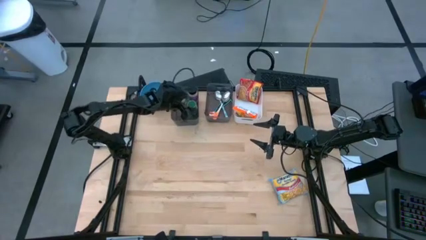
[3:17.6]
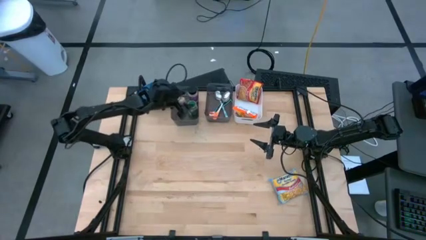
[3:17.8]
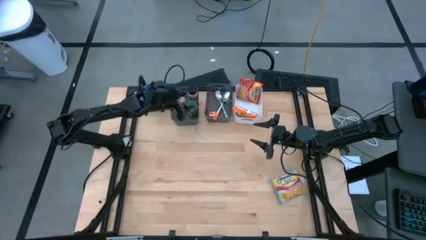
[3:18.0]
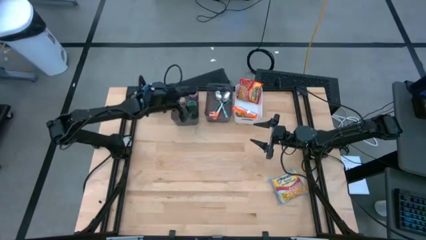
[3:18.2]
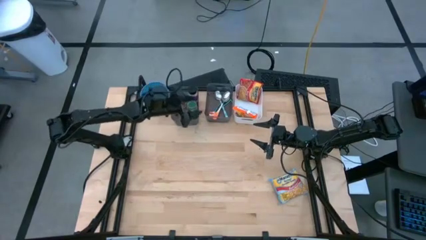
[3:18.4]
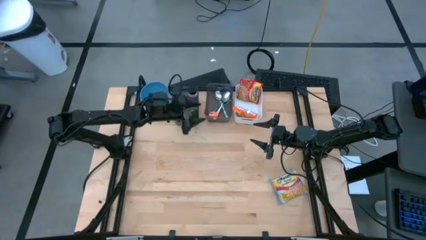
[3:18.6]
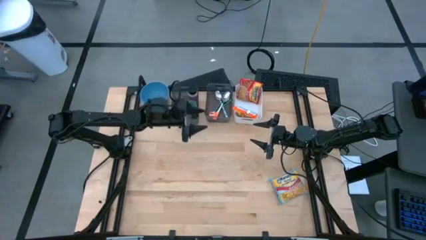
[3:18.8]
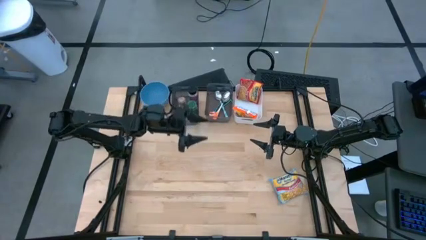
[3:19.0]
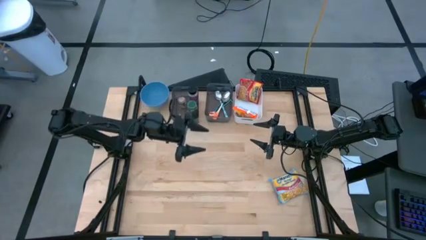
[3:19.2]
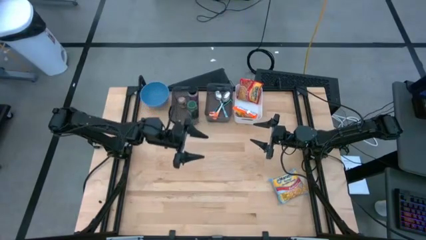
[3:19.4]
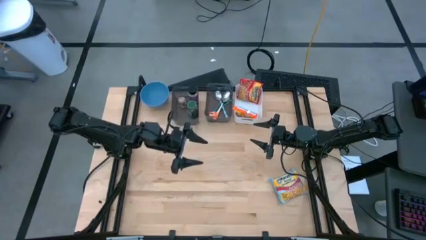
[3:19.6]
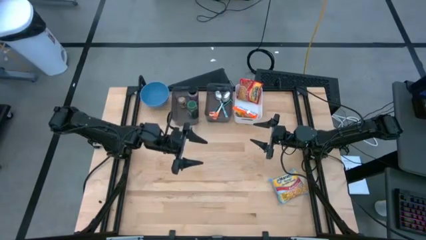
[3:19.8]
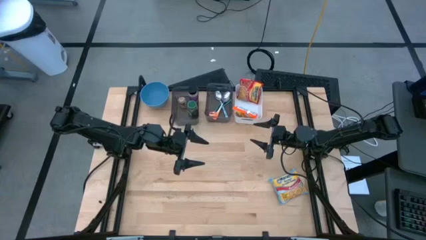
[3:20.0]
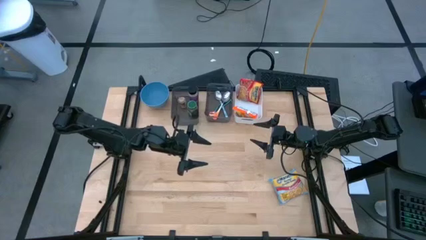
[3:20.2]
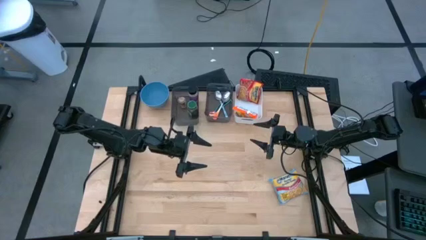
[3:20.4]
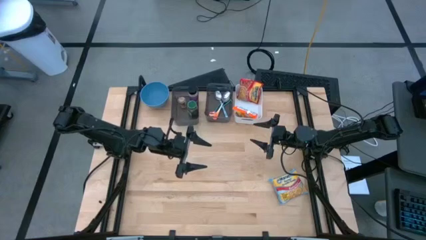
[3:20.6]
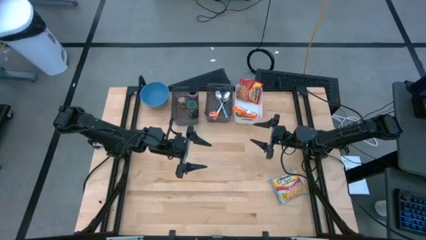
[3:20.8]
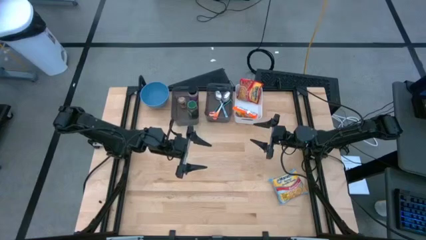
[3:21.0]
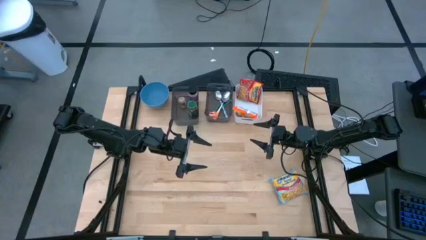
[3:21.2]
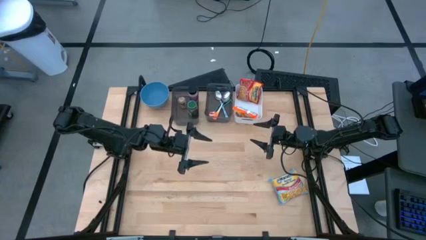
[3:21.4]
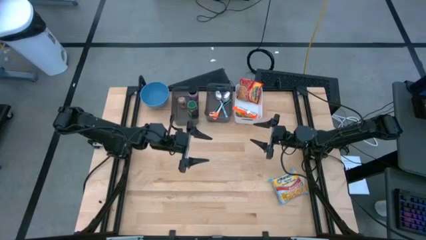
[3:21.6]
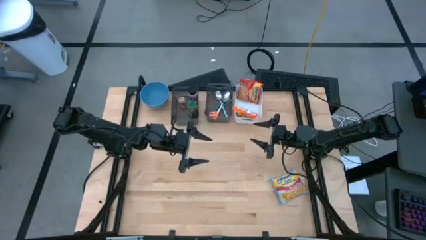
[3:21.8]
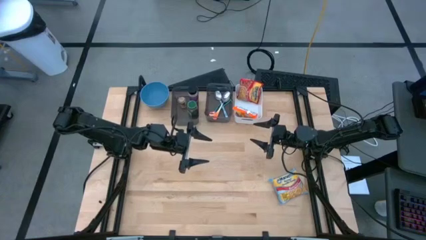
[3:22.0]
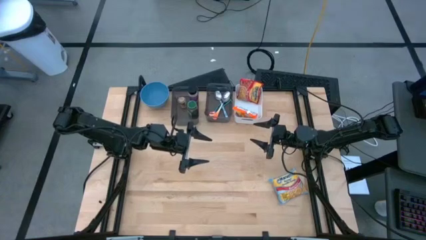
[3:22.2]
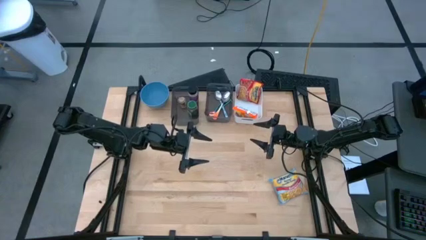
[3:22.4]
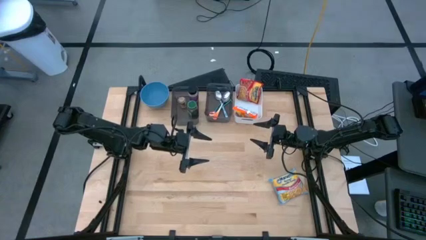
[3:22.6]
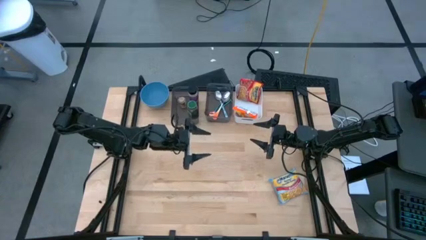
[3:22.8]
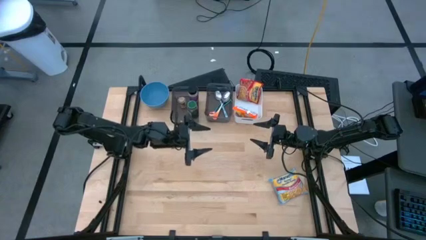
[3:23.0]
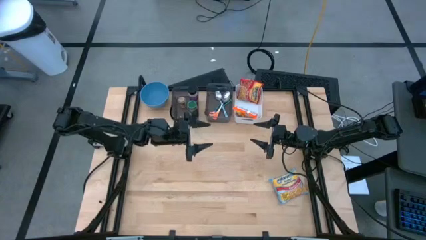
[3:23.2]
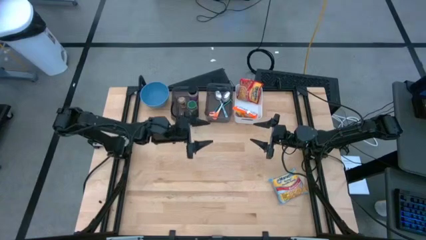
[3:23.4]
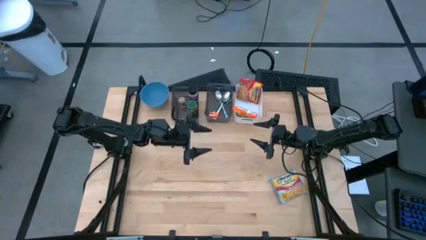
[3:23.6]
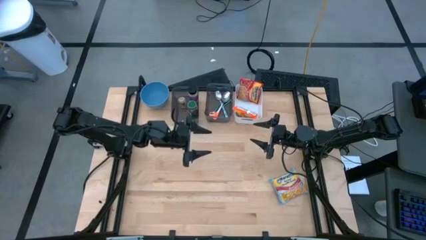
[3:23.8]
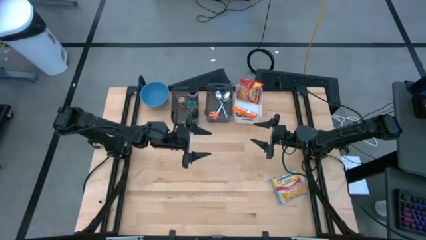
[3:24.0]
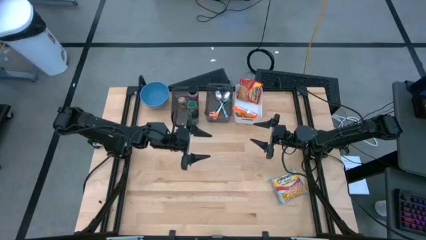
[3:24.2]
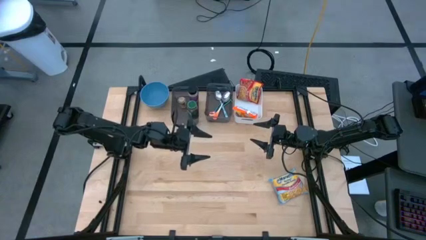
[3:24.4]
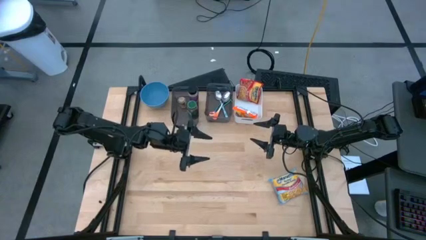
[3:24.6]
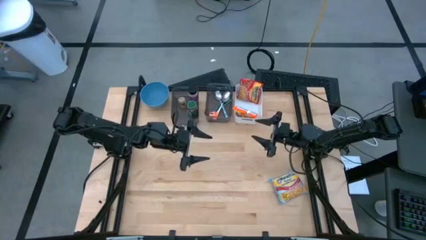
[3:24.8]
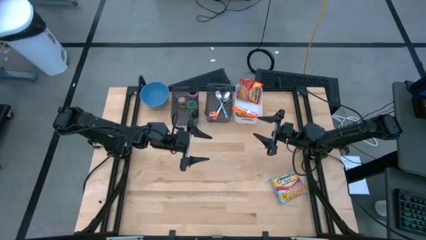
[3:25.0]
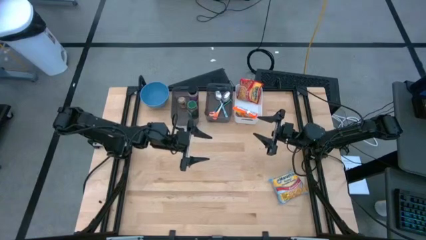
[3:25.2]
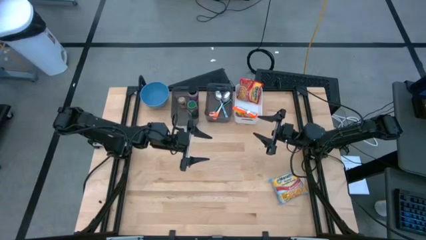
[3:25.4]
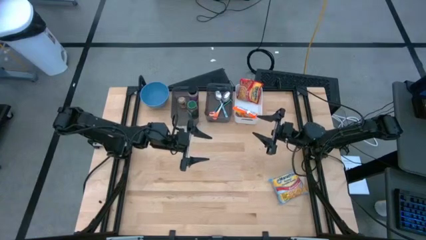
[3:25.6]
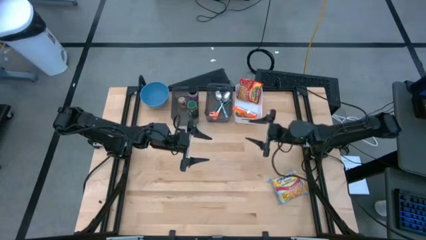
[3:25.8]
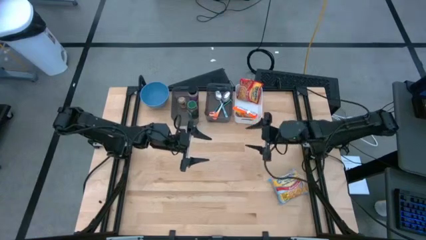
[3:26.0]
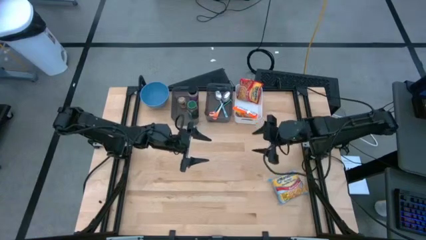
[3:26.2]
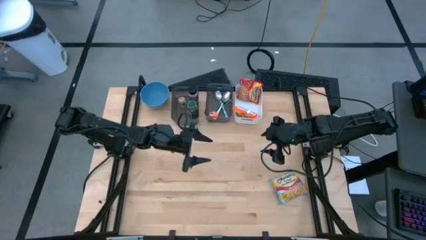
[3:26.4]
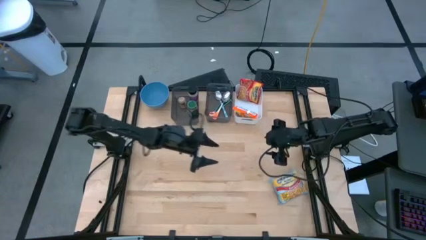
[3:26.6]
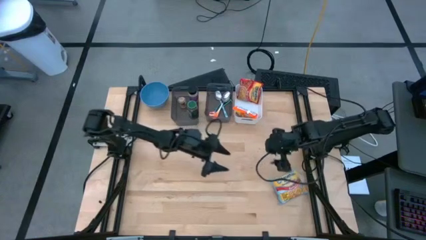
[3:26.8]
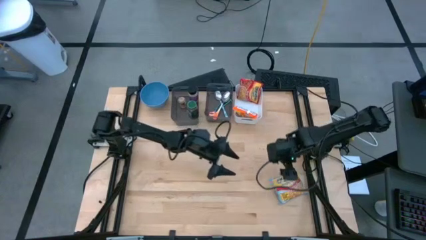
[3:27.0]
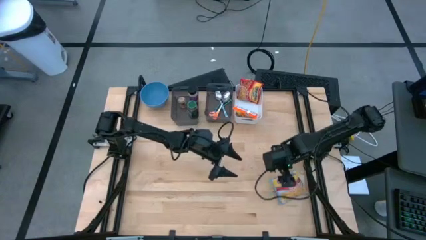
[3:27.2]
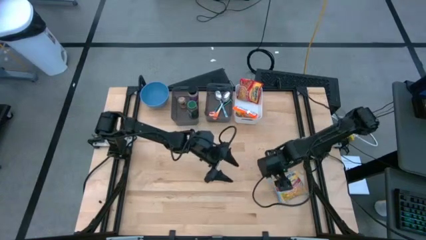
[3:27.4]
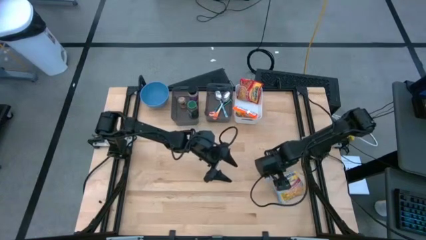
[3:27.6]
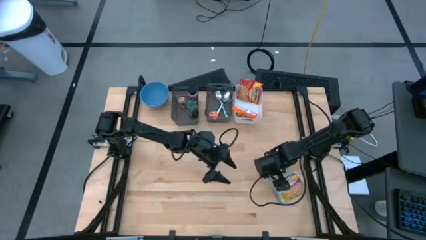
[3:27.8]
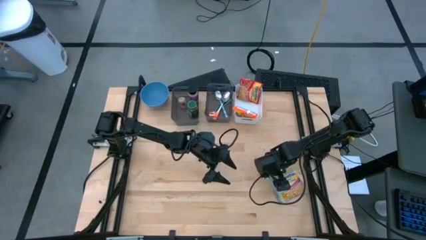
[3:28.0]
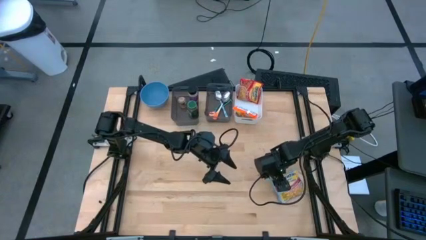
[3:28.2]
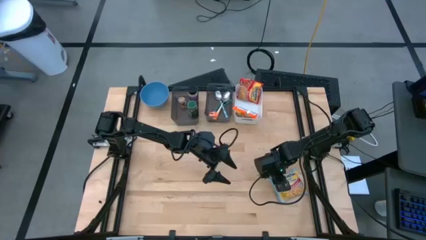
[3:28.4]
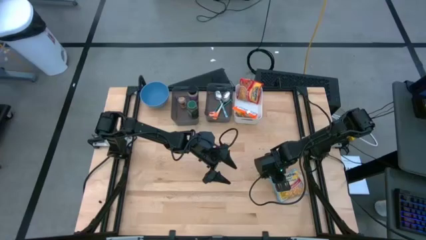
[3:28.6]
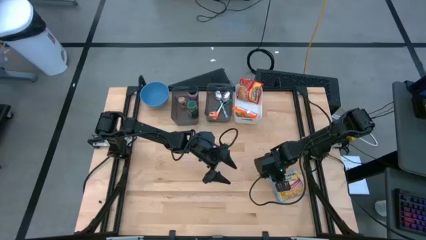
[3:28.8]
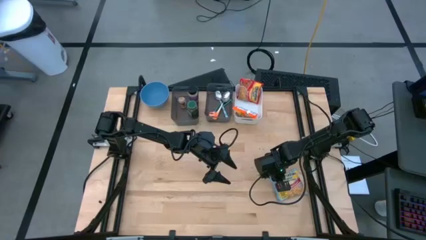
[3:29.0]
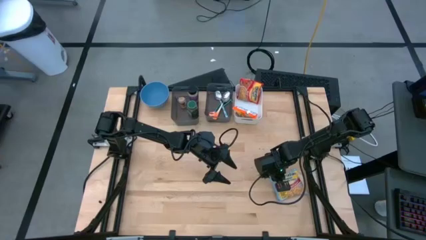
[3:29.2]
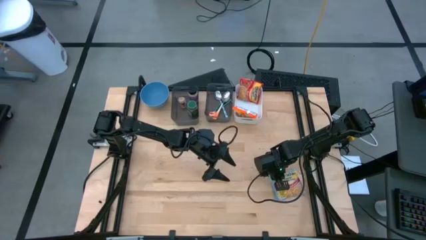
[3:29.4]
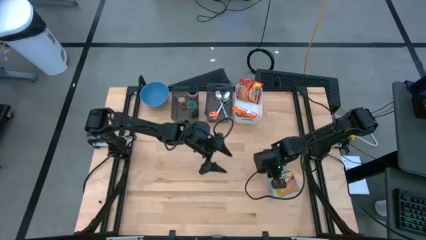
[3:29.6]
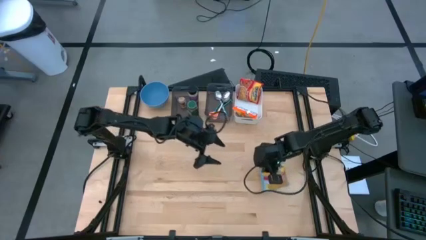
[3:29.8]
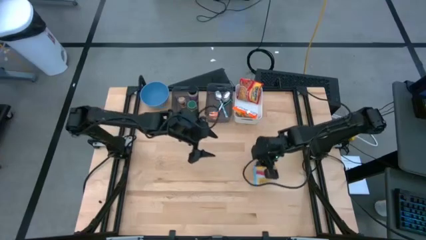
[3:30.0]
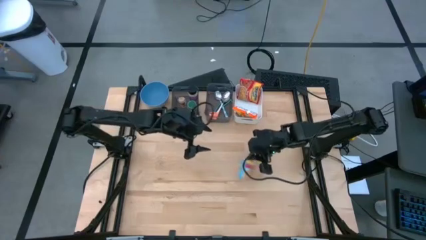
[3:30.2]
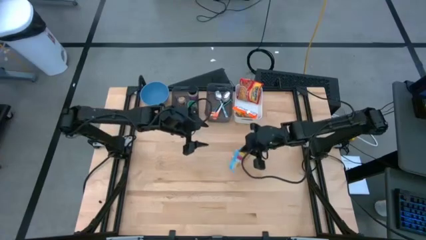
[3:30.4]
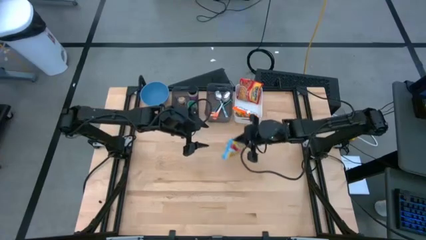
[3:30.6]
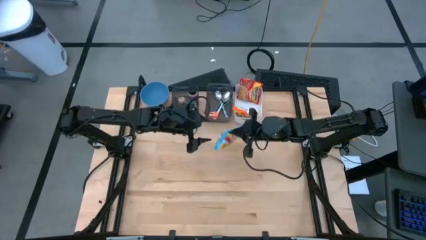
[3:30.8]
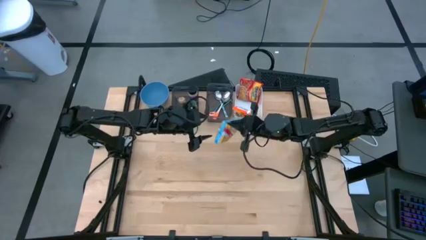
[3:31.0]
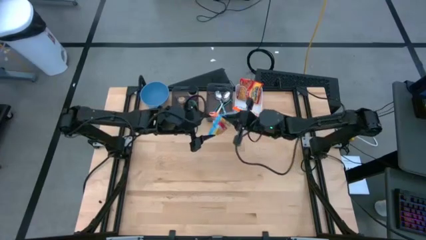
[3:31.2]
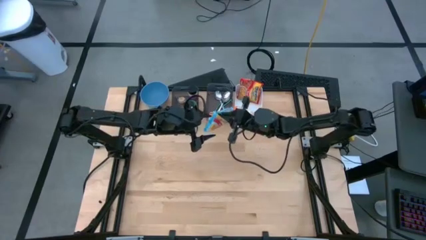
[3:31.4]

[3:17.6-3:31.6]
Task: Pick & Place Food Item
Put the light blue noodle pack into the white bin

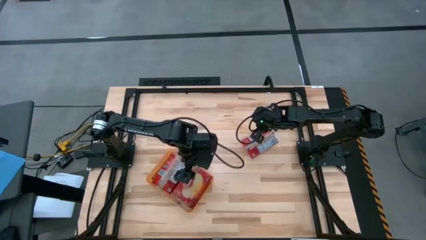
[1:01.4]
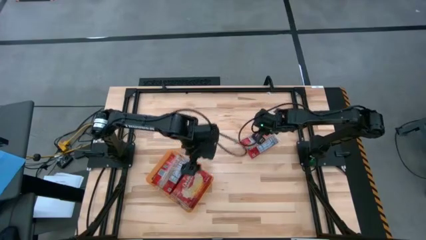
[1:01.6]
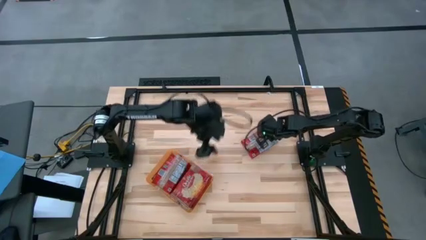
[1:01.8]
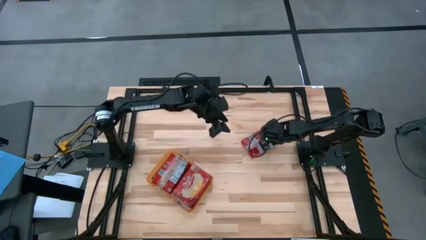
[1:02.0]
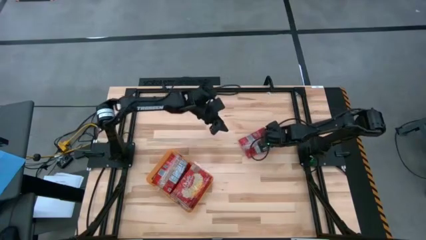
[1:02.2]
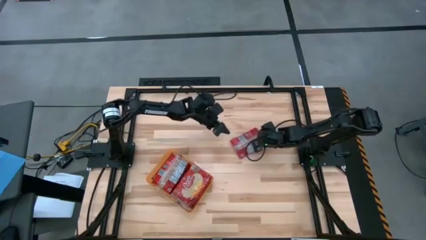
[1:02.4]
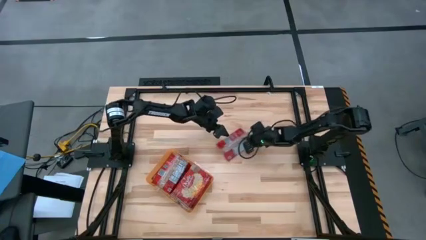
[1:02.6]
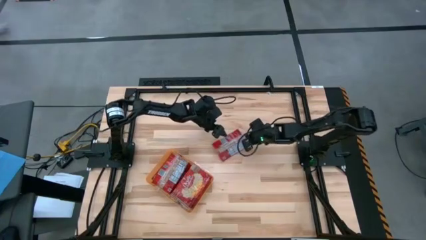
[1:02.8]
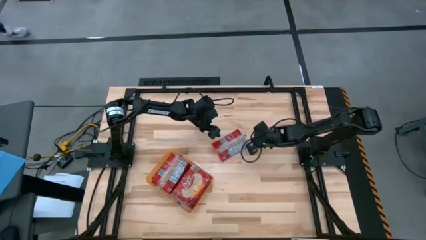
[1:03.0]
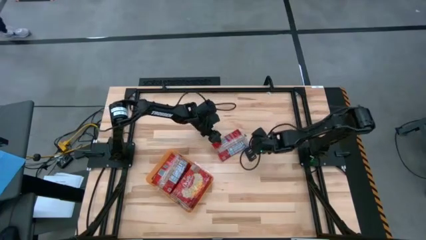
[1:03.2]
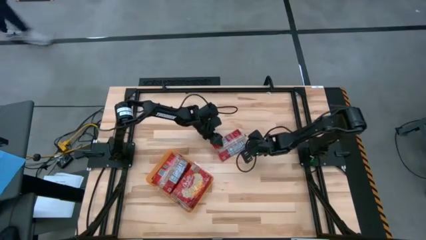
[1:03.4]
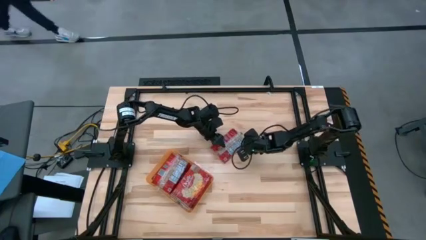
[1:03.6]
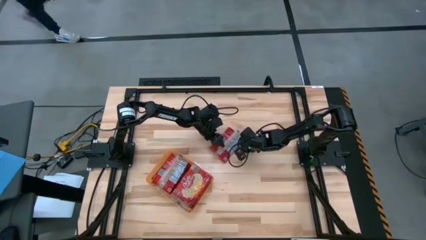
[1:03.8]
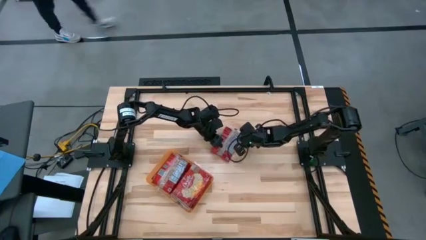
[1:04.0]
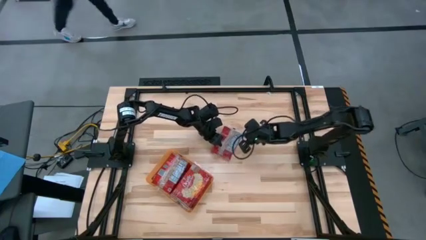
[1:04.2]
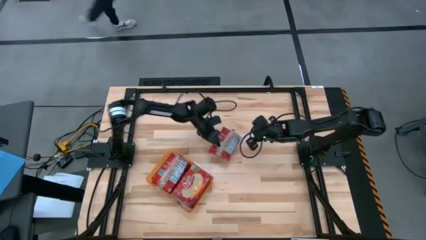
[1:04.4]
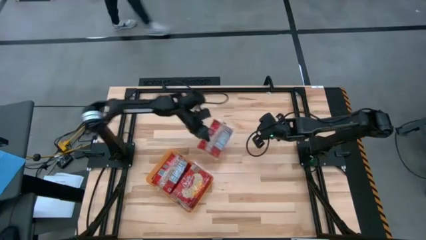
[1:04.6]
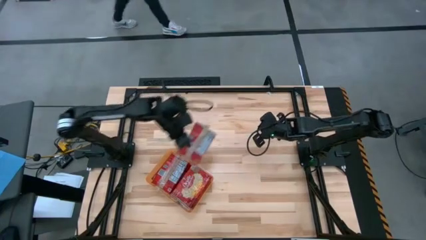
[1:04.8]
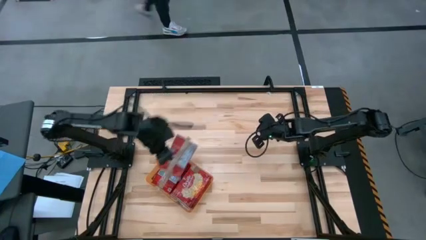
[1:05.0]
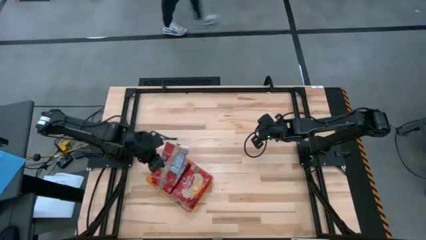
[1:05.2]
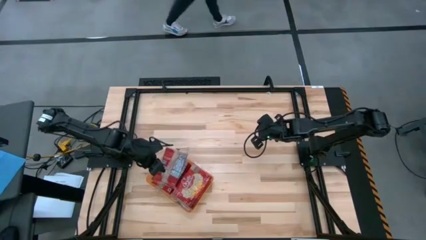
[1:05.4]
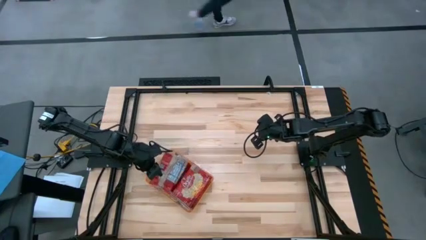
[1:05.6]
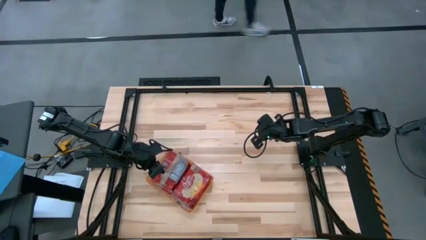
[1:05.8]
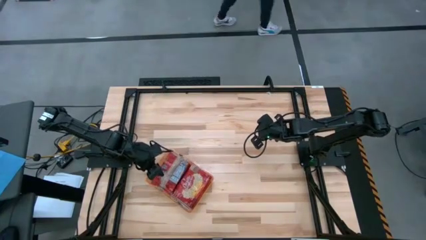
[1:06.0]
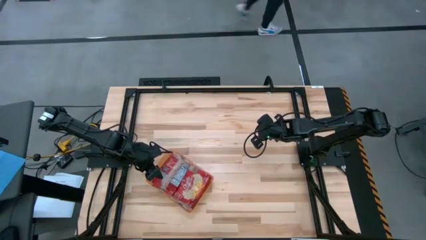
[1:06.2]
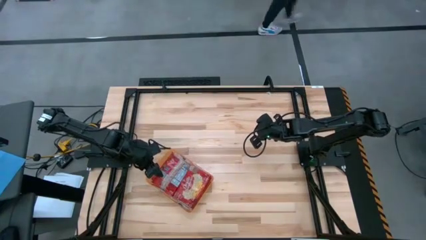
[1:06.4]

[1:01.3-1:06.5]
Task: Sort popcorn bags into baskets
Put the popcorn bag into the orange bin
